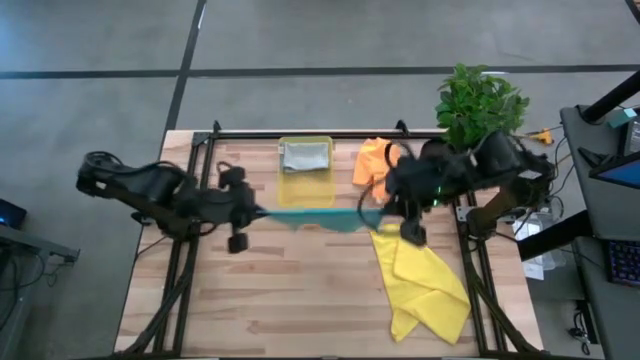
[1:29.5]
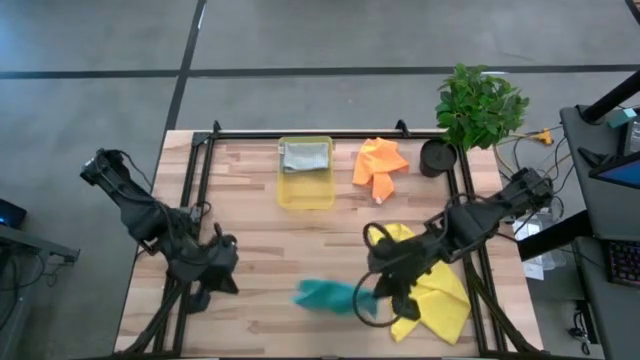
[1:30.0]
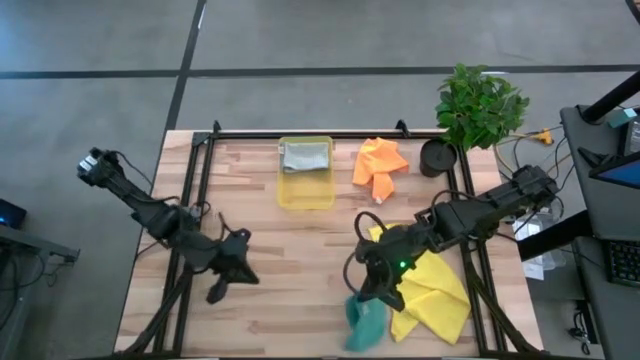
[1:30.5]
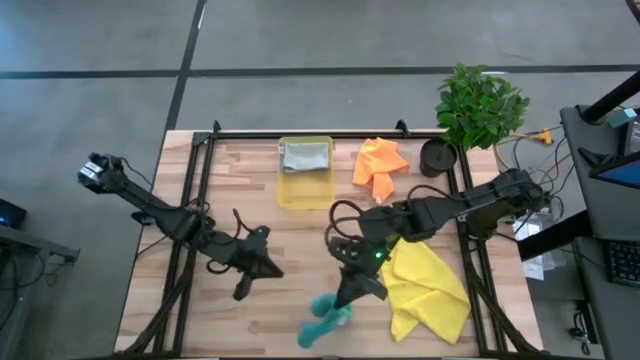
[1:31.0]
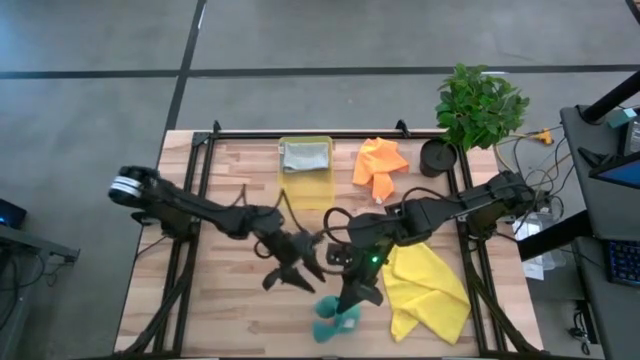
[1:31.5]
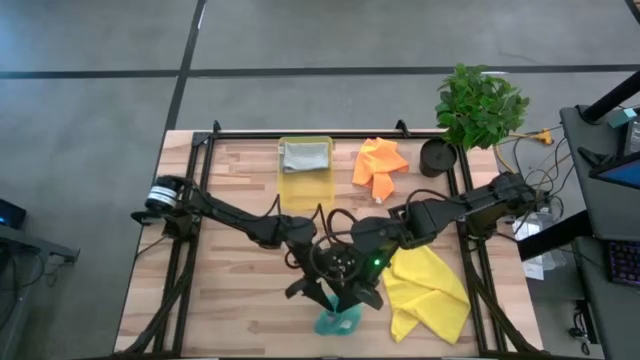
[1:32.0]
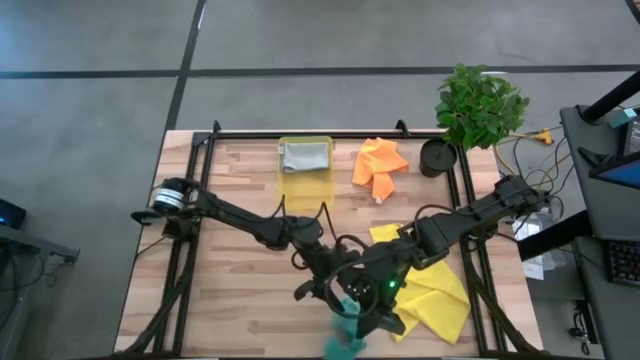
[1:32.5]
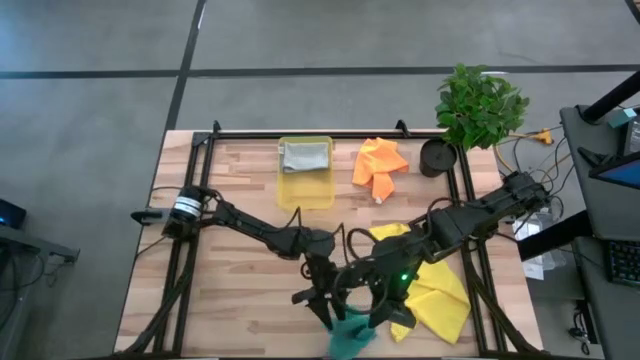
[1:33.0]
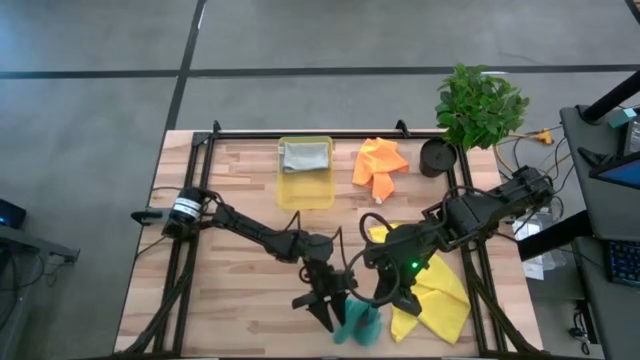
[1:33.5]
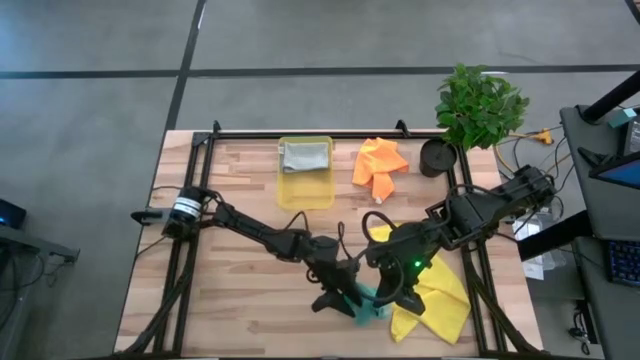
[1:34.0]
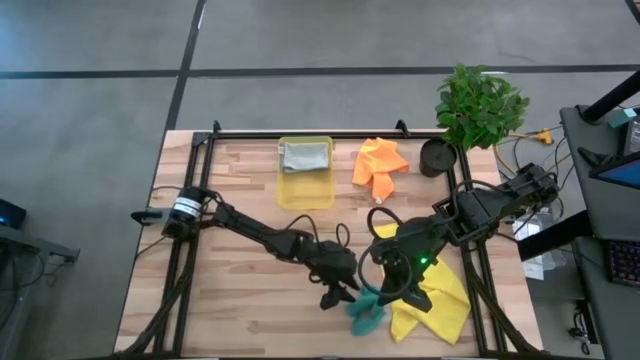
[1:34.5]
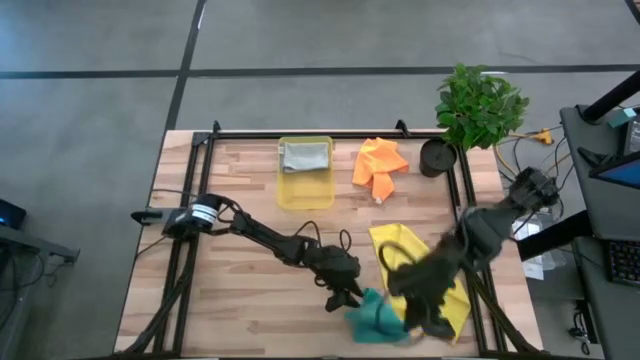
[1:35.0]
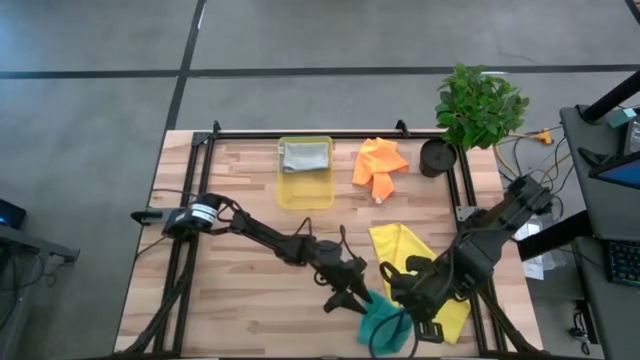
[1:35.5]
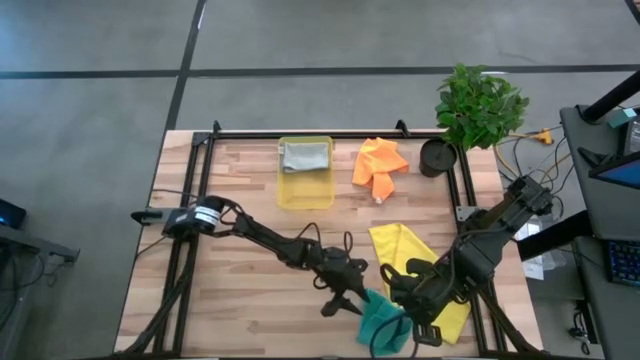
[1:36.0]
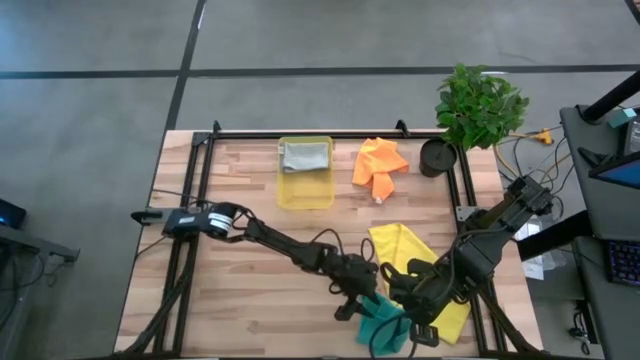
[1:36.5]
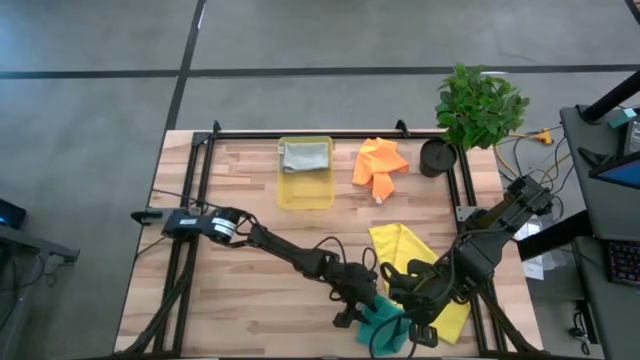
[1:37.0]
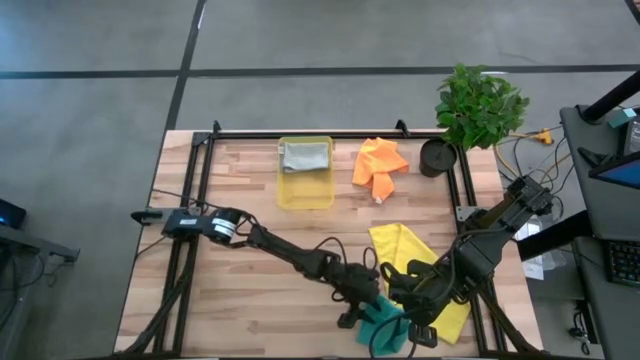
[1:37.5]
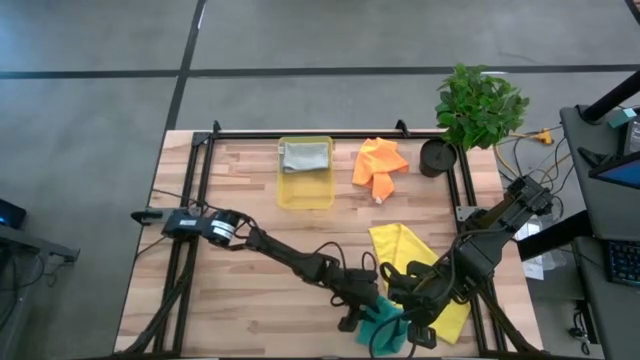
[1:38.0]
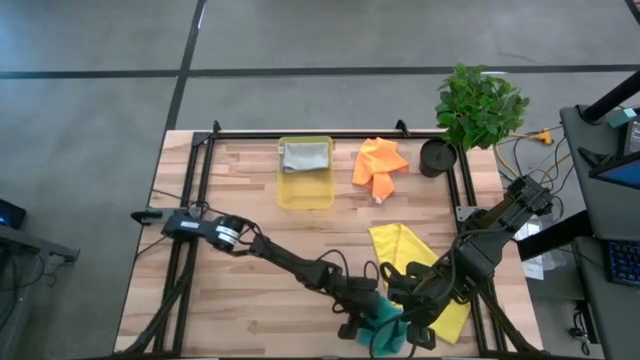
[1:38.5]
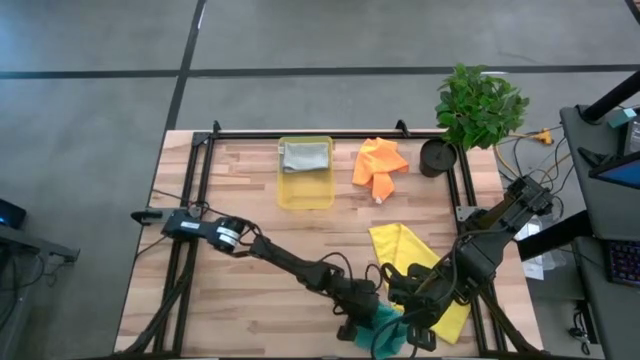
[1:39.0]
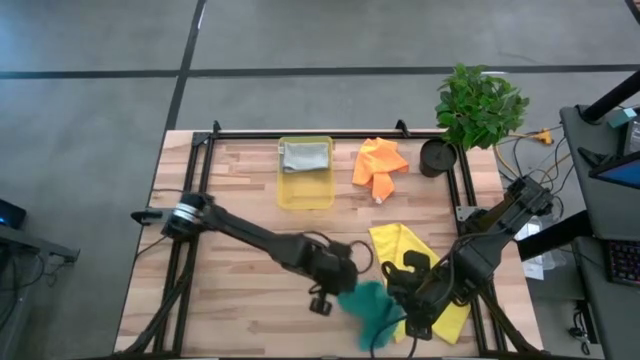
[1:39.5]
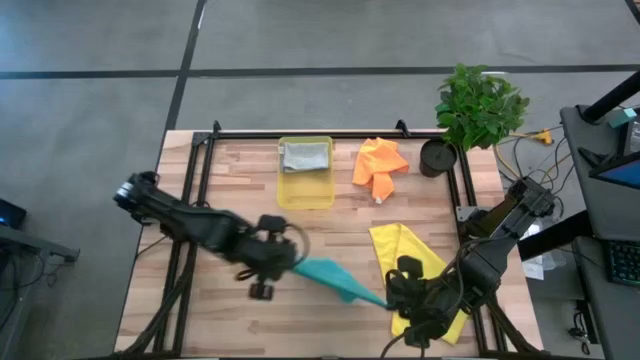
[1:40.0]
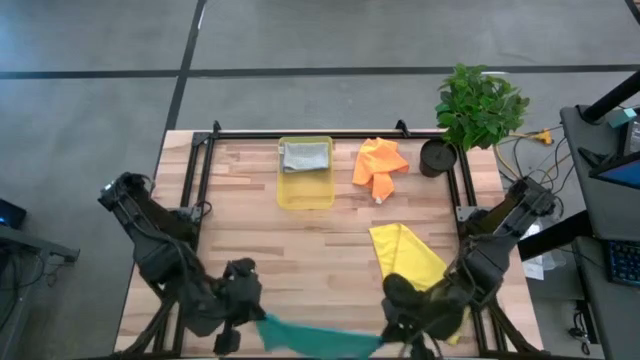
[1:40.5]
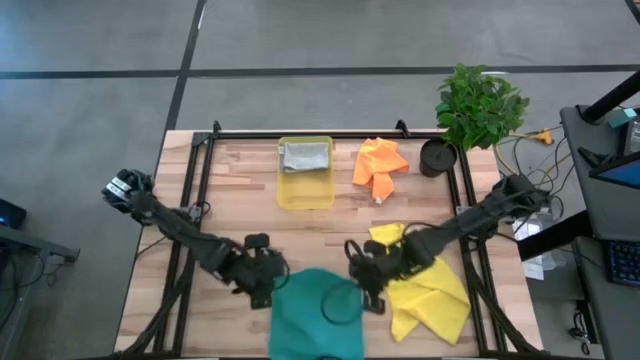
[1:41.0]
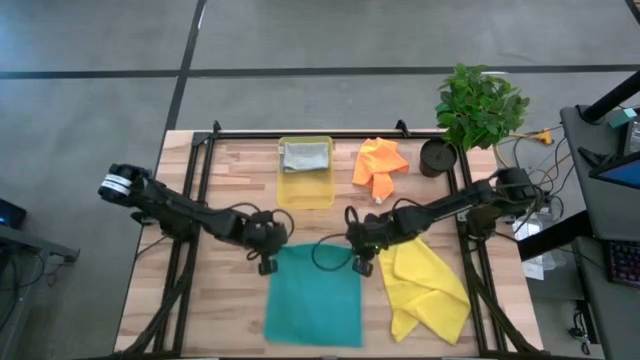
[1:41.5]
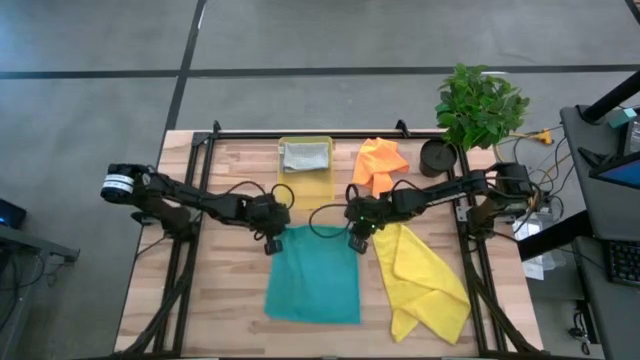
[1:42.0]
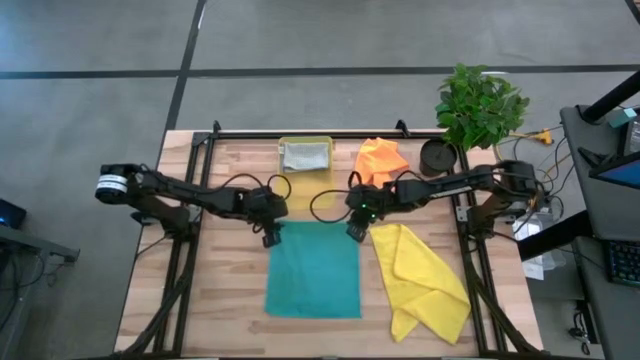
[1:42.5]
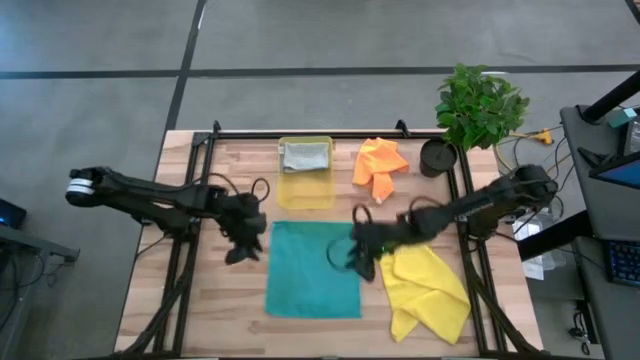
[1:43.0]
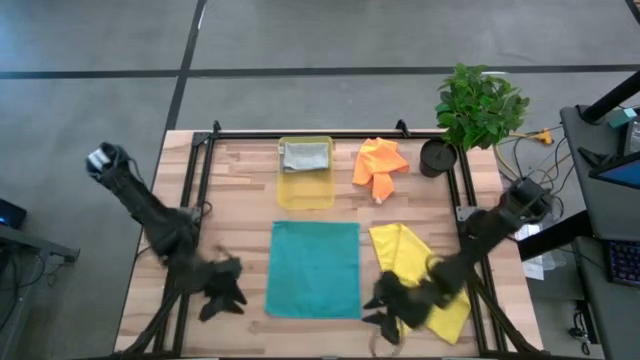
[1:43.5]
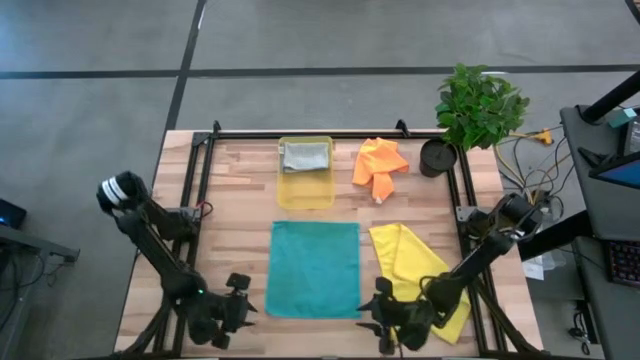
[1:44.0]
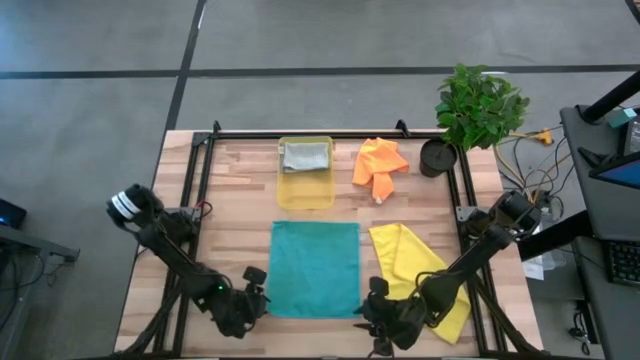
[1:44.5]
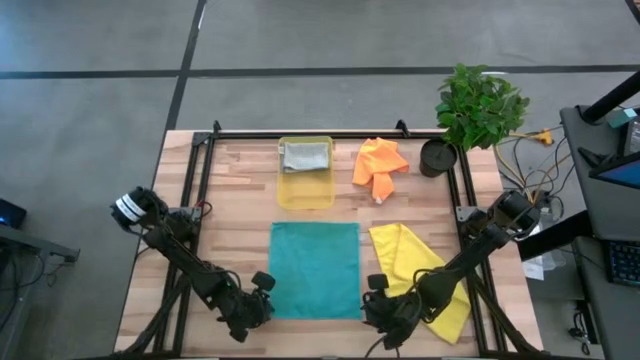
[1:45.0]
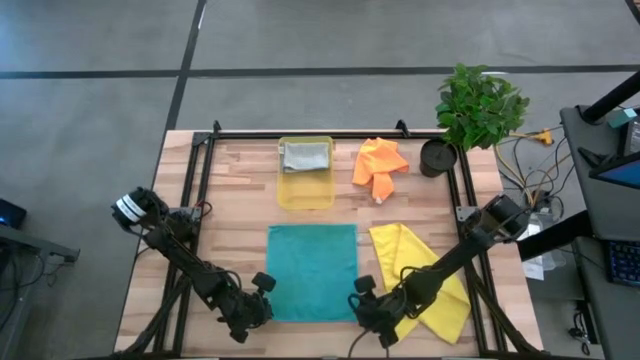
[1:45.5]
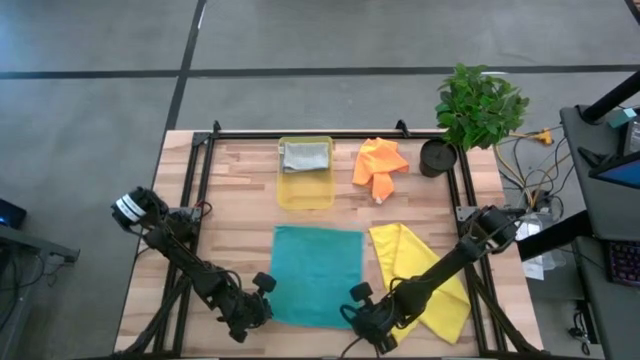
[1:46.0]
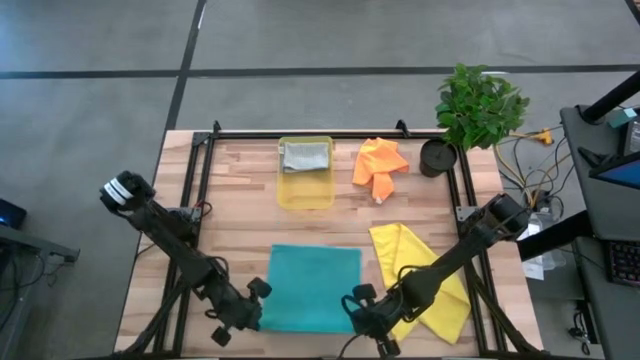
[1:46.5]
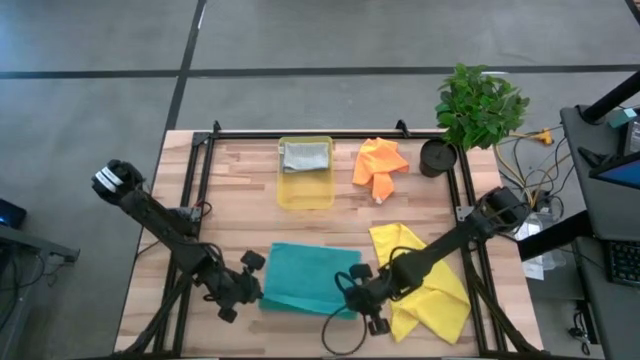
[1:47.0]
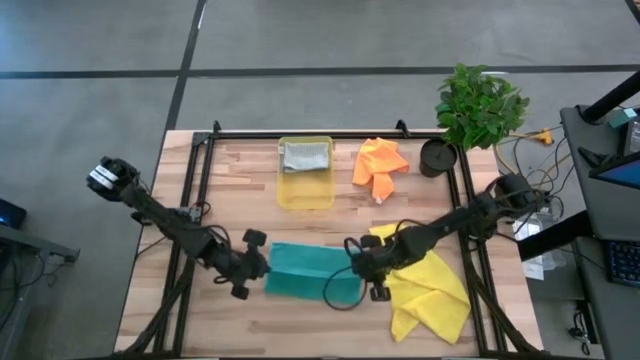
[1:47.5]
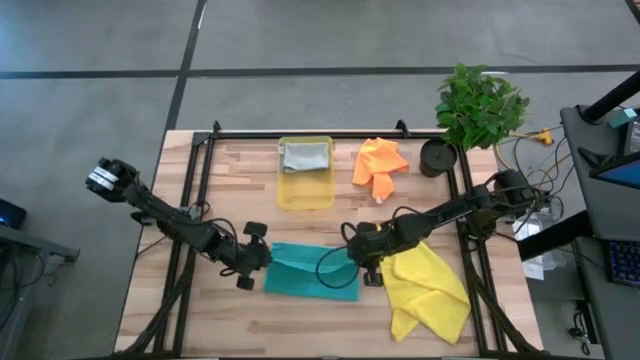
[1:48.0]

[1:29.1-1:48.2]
Task: Fold microfiber towels
Fold the light blue microfiber cloth

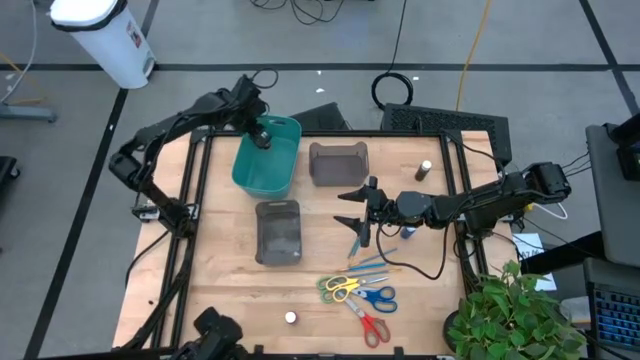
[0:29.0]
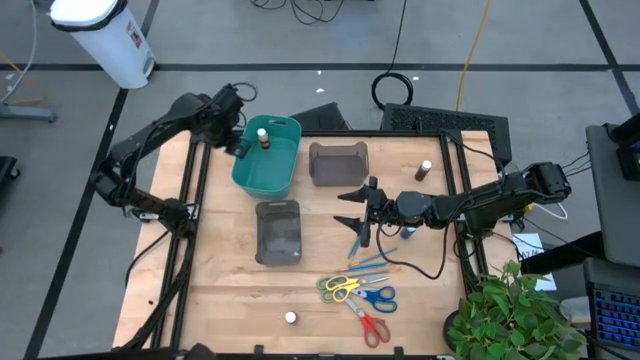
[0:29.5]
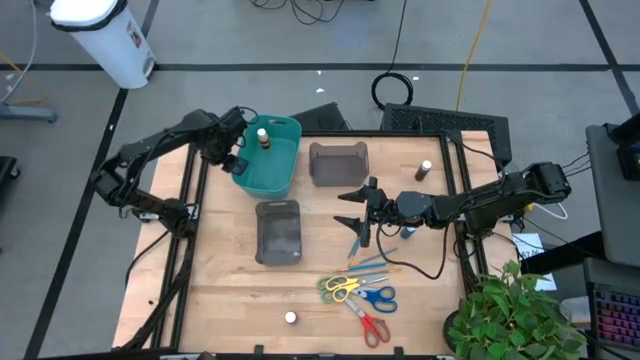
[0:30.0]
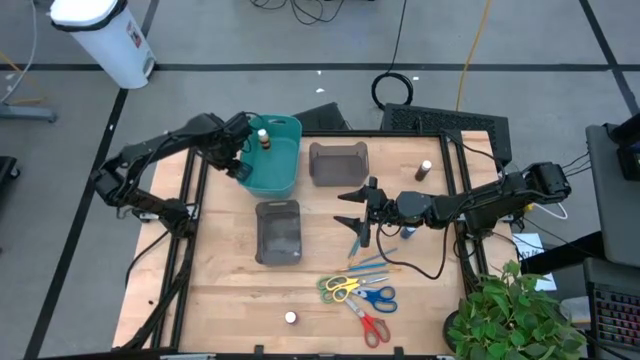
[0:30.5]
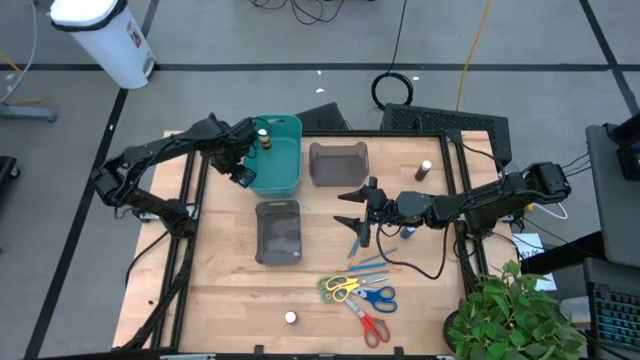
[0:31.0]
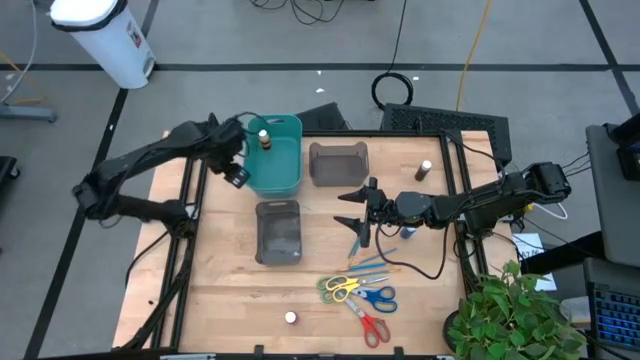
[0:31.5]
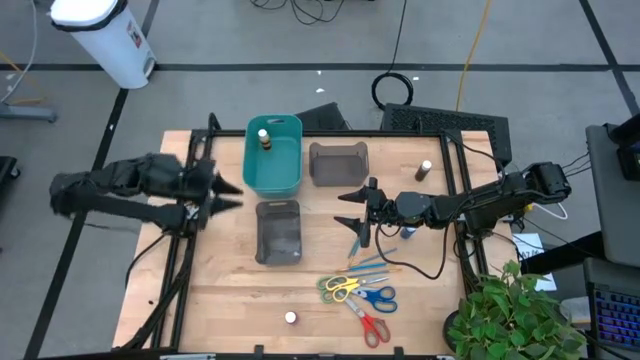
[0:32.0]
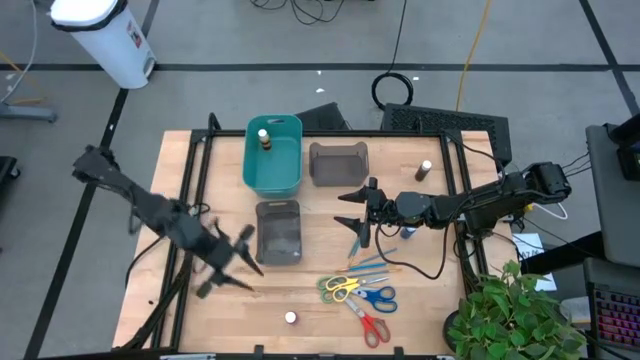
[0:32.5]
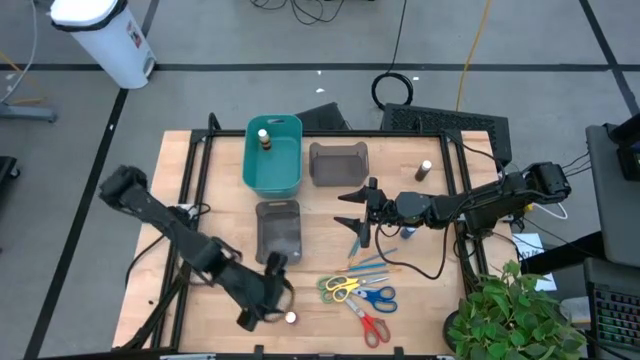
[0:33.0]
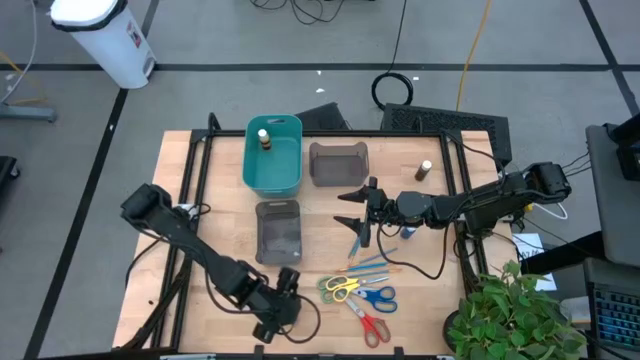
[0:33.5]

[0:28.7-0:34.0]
Task: Pick & Place Paint Supplies
Put the pink paint bottle into the blue bin
